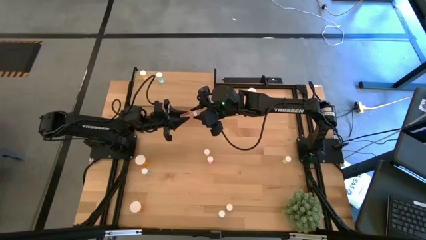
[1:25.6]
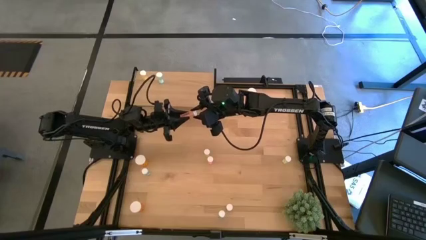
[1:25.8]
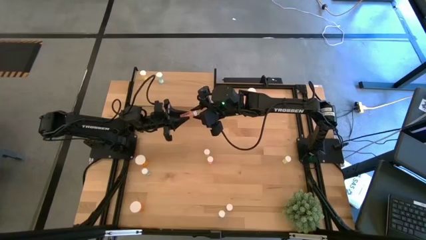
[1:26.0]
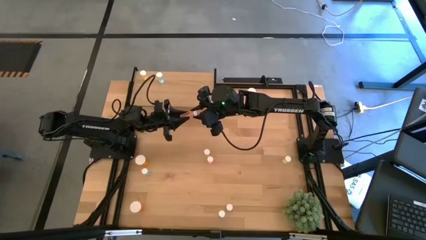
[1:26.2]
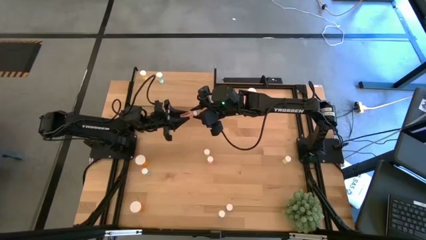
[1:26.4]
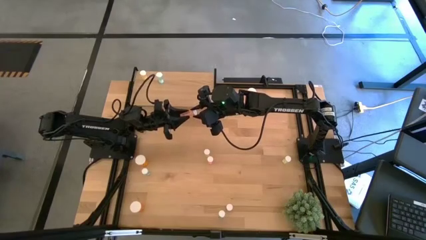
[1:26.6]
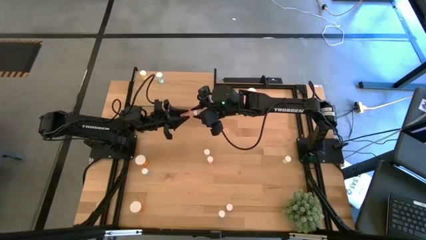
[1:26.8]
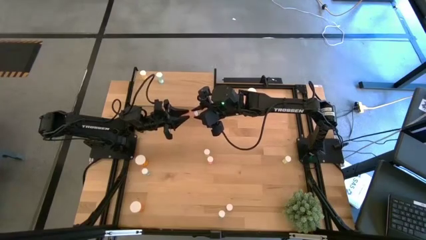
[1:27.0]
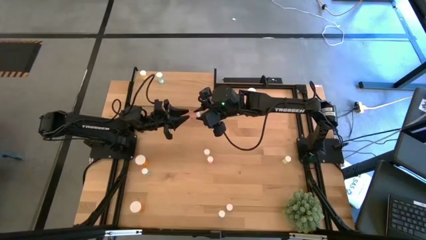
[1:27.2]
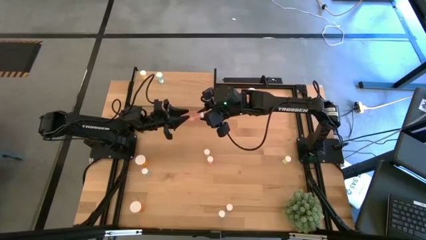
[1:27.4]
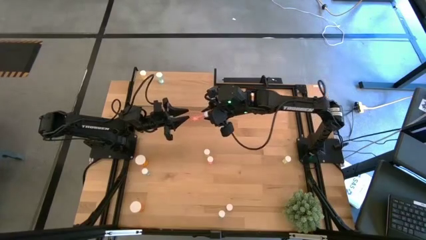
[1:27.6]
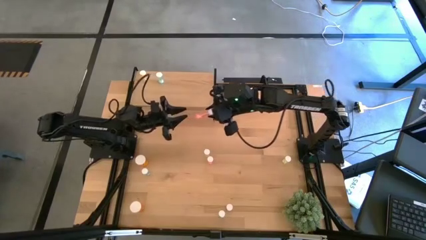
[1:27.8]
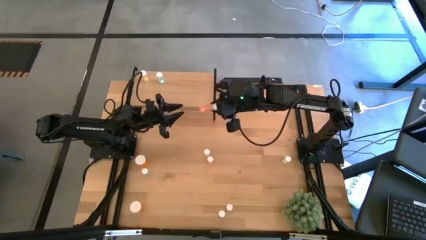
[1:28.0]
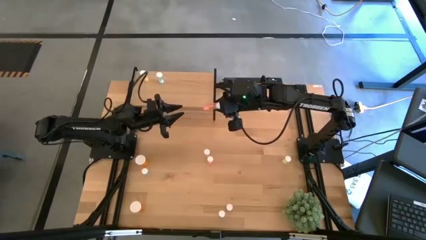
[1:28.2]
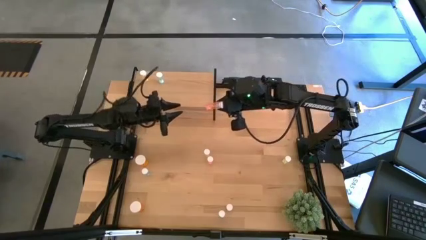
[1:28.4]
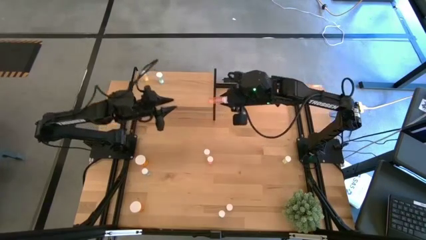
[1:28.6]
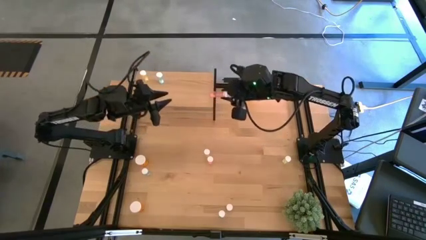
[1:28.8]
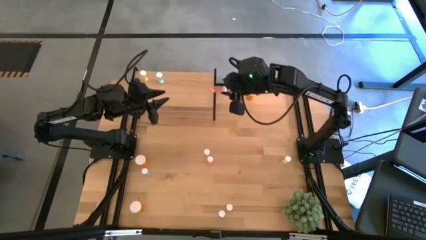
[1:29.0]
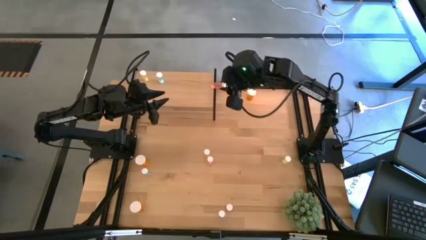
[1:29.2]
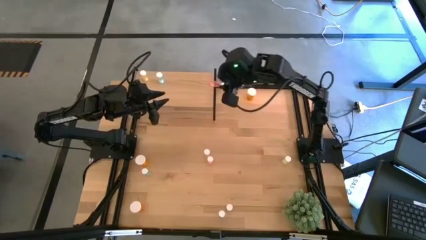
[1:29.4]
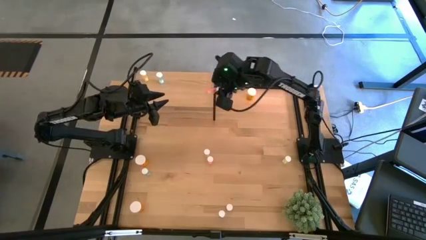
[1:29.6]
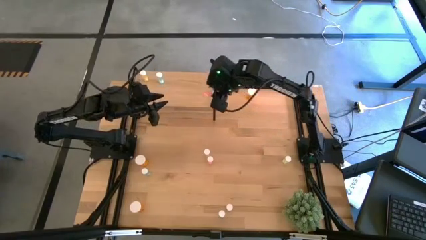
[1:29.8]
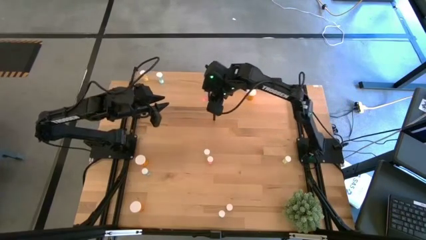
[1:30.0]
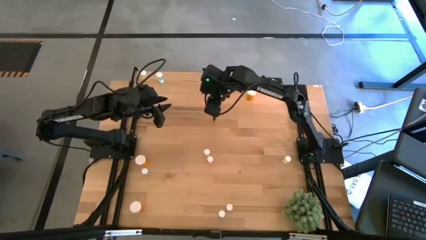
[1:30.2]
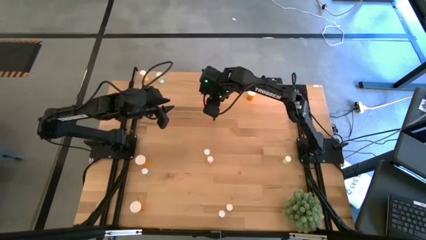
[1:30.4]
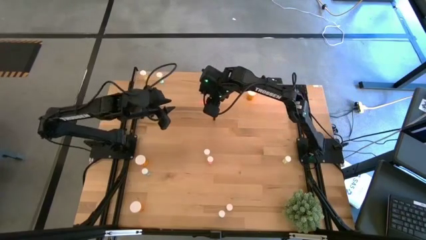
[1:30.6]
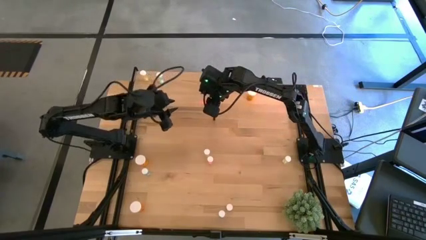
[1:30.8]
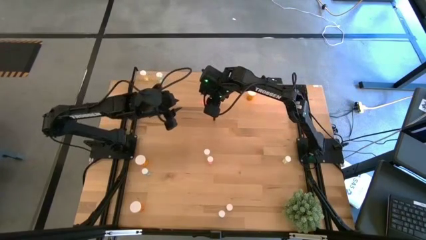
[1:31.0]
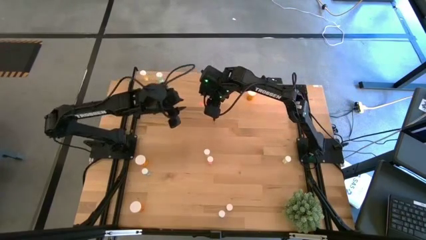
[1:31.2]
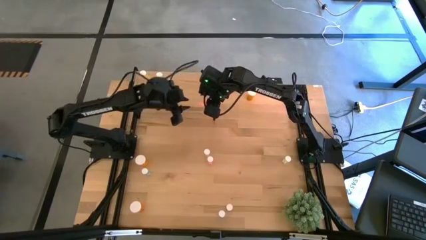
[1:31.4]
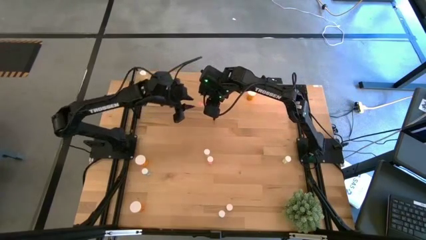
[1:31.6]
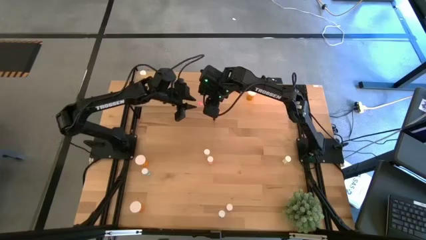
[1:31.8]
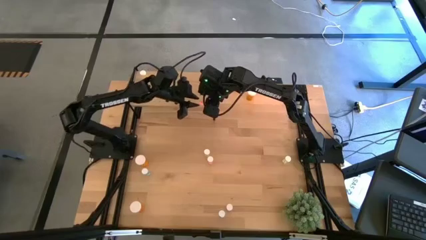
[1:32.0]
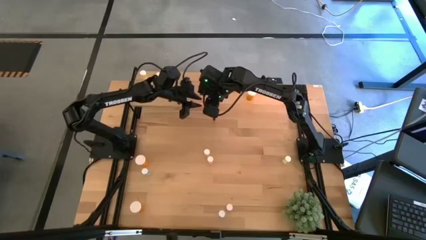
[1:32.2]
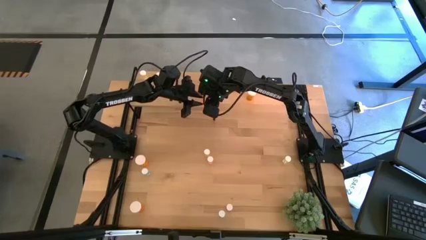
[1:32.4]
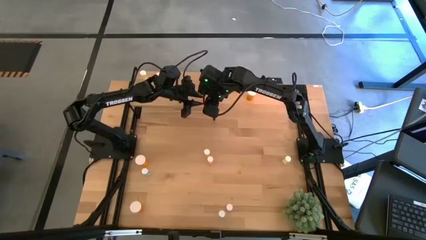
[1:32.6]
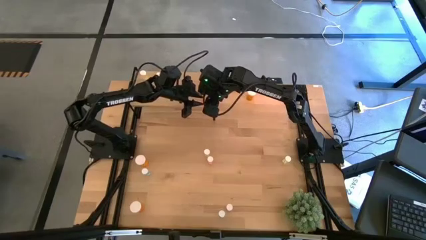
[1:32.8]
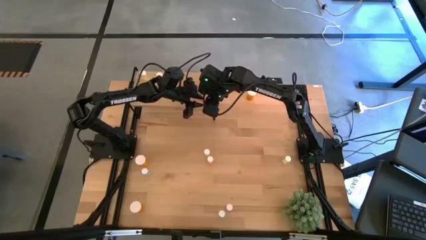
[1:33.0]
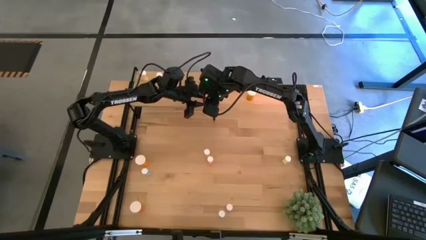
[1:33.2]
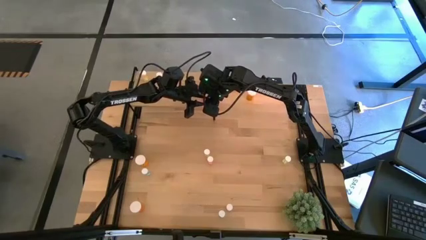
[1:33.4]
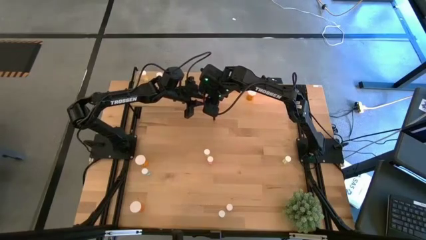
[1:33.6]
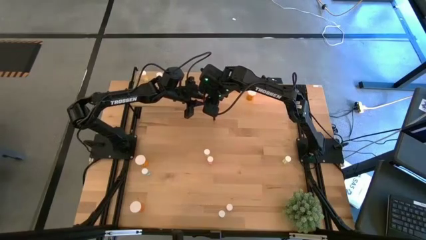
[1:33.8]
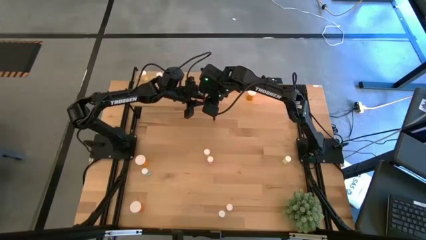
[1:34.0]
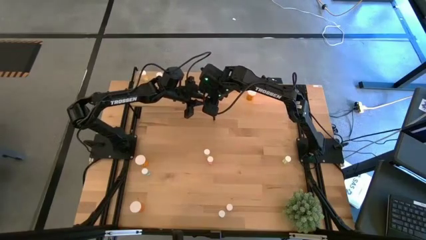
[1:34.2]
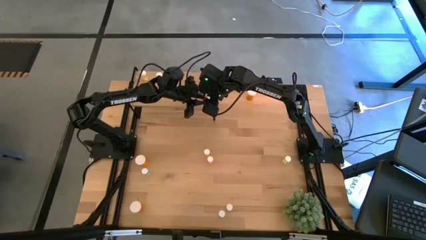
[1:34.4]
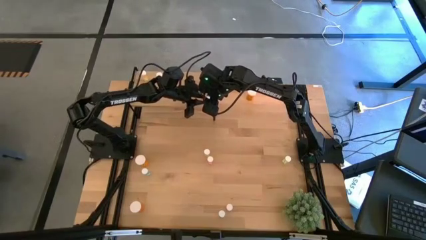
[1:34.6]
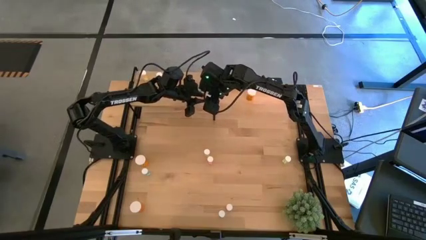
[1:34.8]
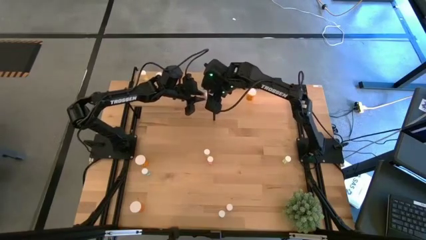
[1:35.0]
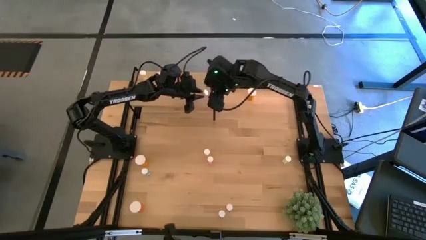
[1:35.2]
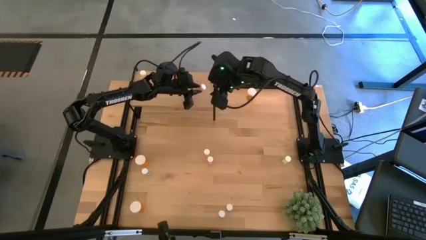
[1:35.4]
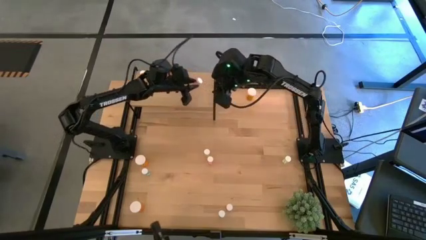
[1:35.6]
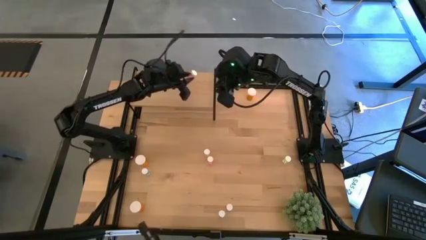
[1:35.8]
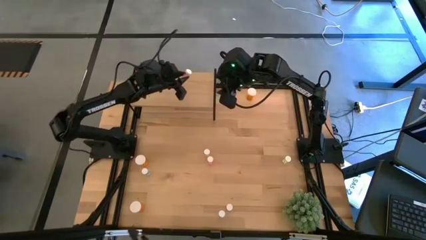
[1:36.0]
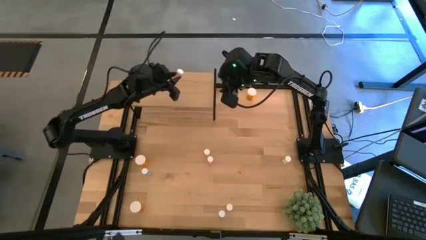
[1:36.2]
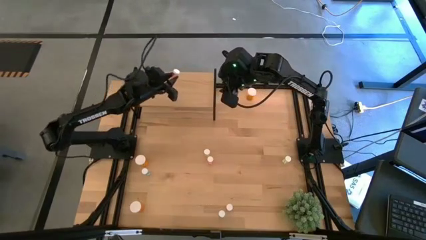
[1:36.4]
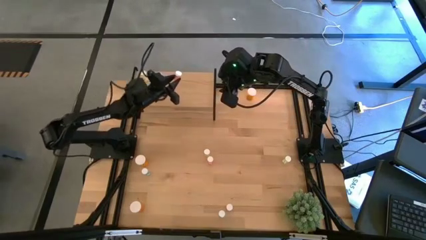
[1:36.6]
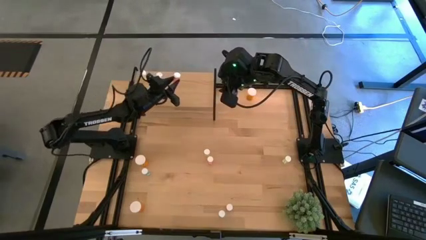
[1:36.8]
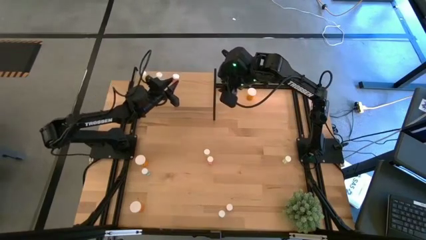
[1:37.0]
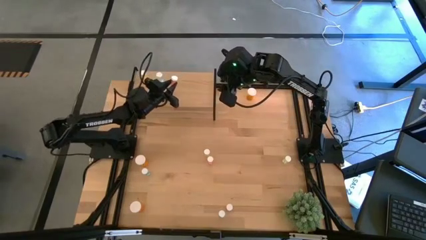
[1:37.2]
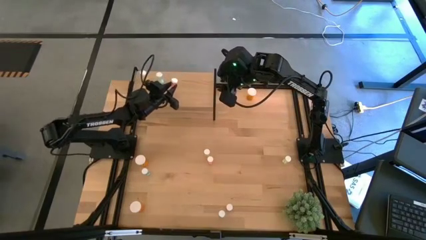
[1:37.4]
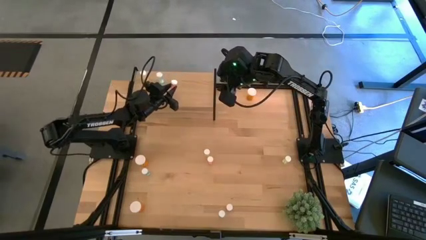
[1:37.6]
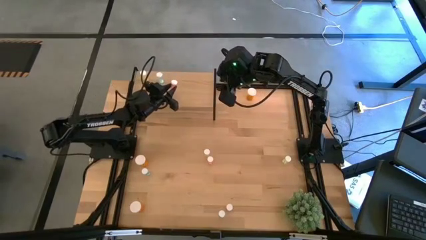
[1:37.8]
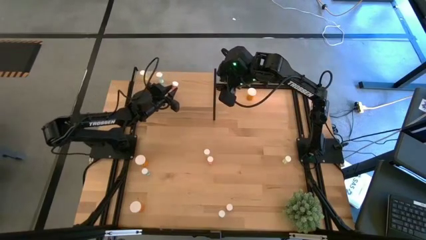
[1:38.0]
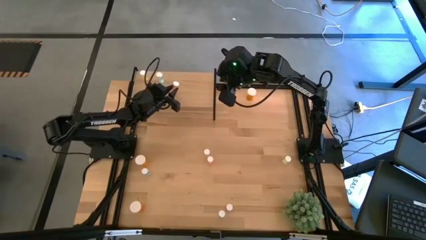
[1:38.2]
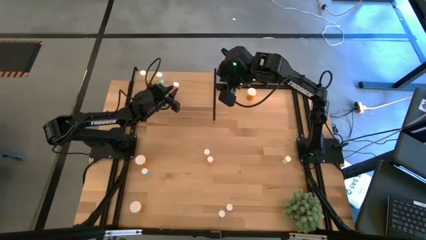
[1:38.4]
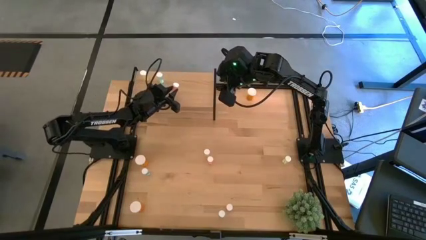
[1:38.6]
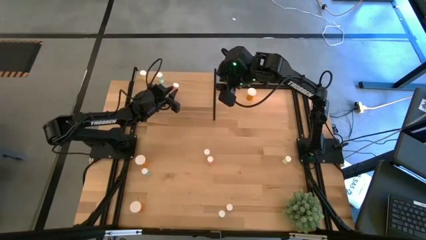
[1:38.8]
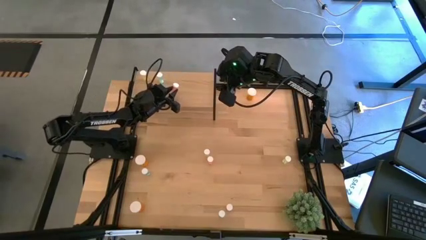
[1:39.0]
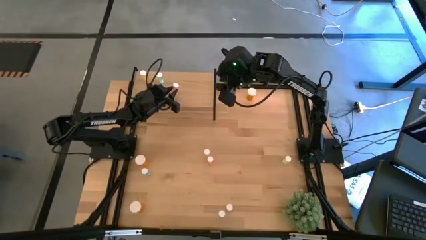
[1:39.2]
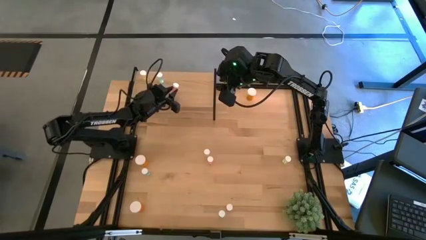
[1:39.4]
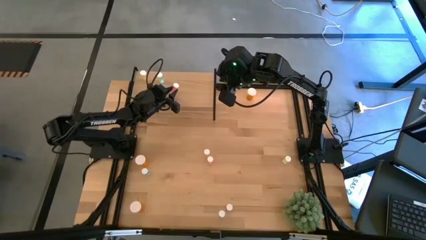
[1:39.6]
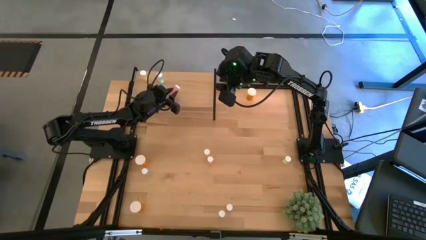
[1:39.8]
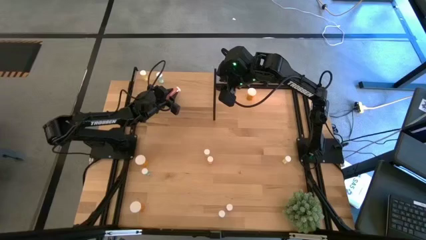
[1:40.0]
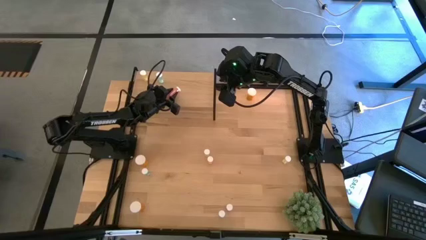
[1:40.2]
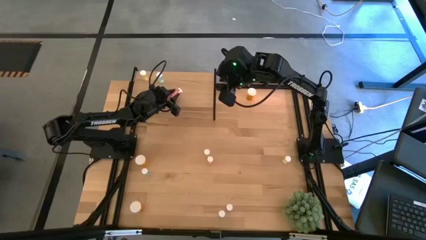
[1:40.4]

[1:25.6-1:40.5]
Task: Pick and place medicine bottles onto shelf by color
Put the top right small red pill bottle on the shelf
